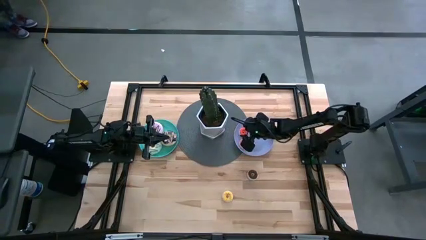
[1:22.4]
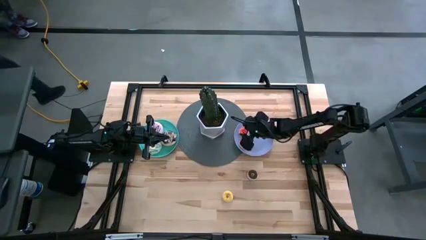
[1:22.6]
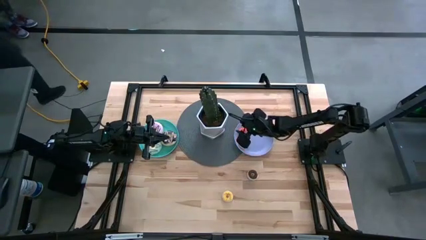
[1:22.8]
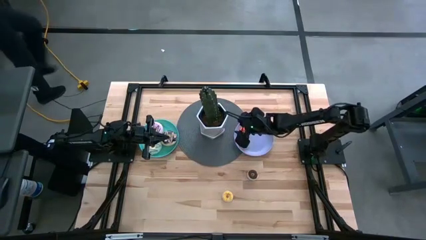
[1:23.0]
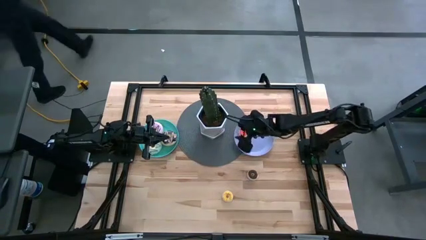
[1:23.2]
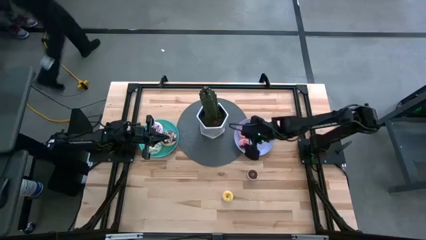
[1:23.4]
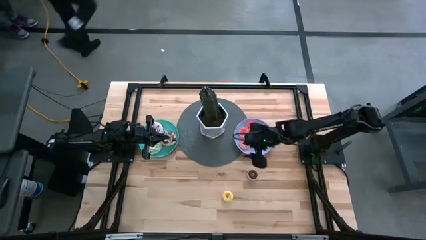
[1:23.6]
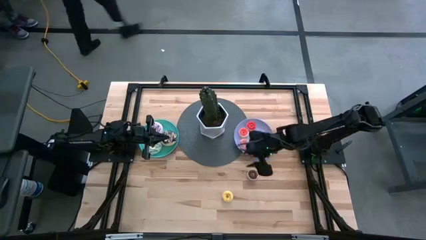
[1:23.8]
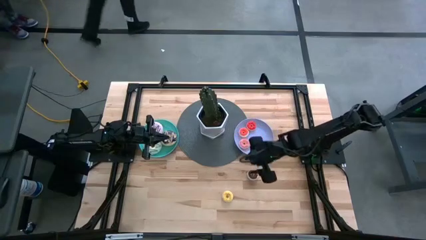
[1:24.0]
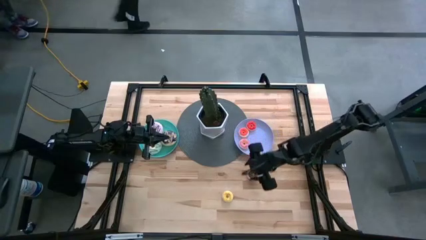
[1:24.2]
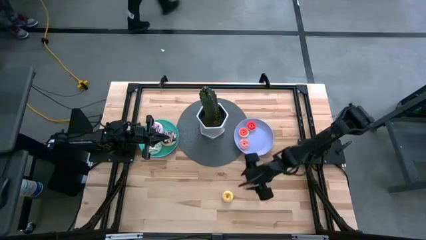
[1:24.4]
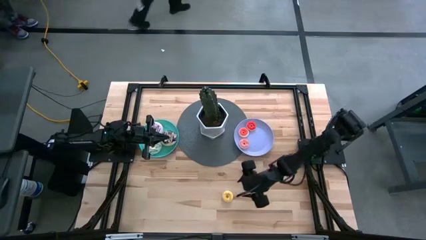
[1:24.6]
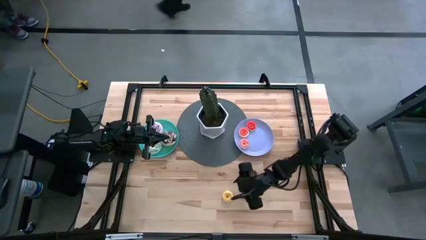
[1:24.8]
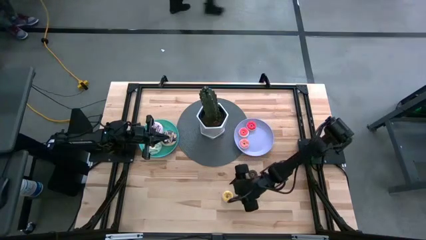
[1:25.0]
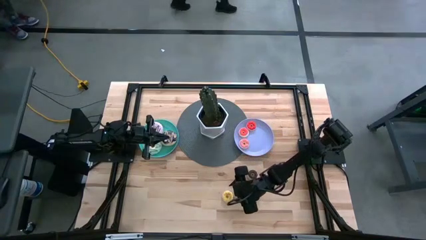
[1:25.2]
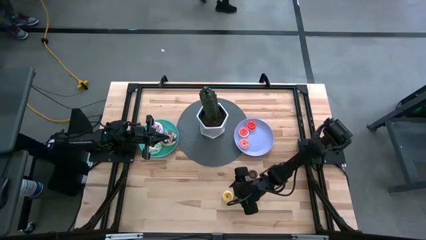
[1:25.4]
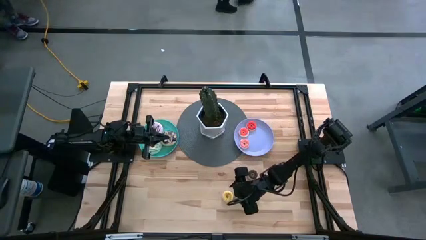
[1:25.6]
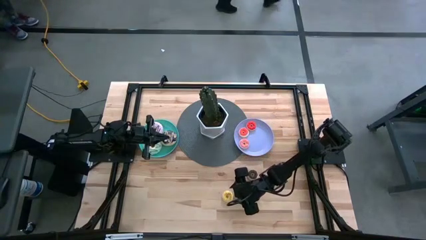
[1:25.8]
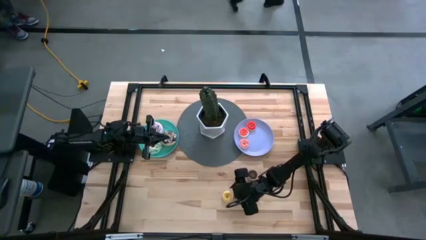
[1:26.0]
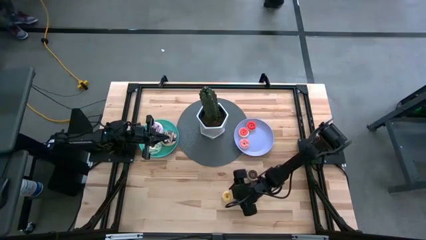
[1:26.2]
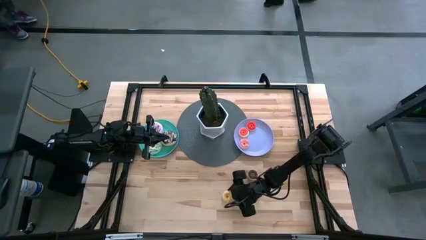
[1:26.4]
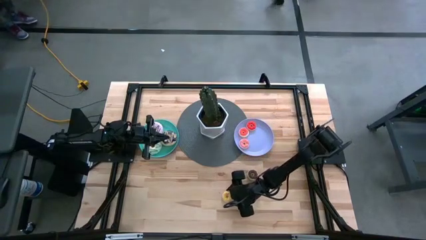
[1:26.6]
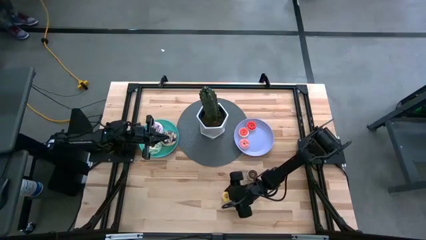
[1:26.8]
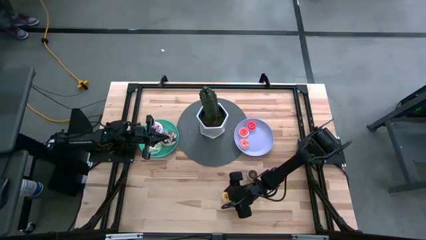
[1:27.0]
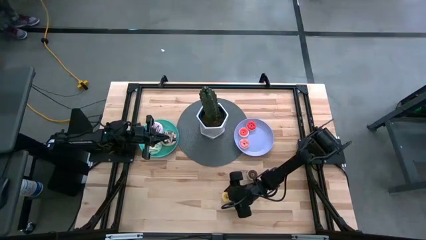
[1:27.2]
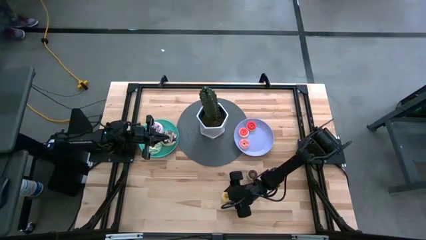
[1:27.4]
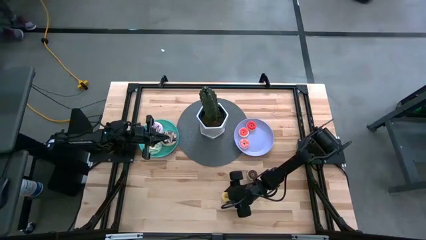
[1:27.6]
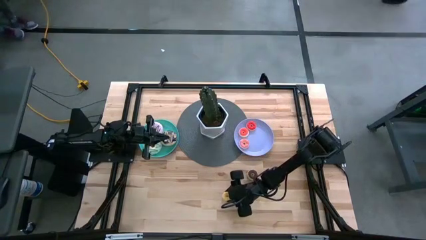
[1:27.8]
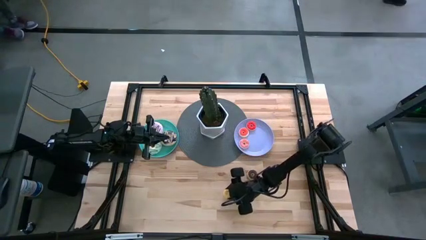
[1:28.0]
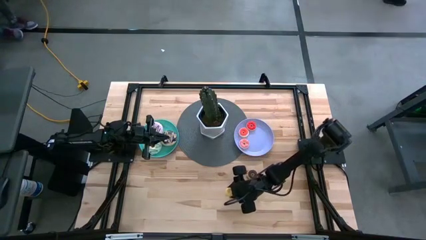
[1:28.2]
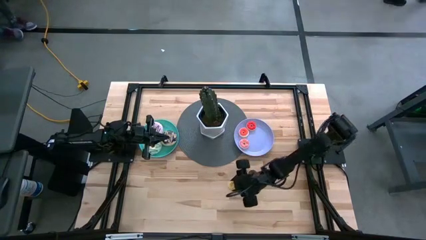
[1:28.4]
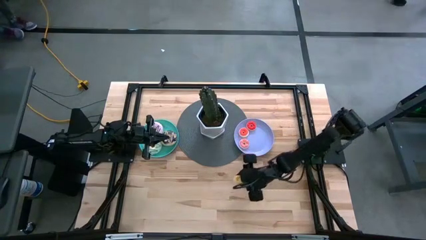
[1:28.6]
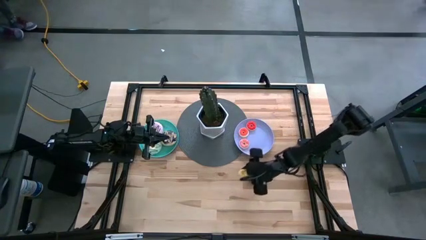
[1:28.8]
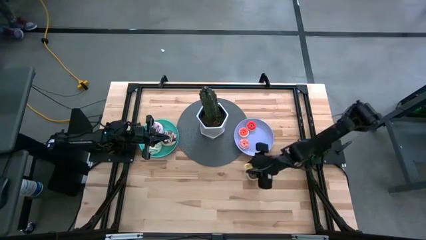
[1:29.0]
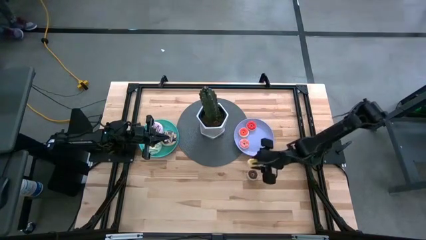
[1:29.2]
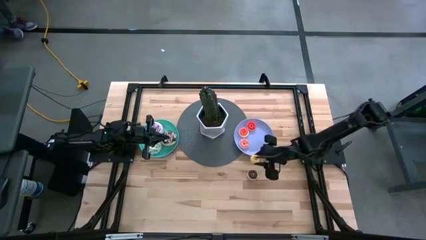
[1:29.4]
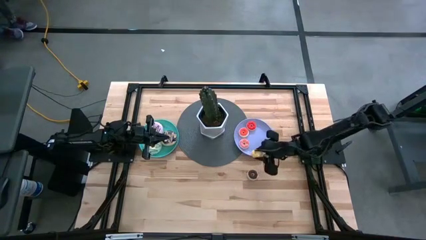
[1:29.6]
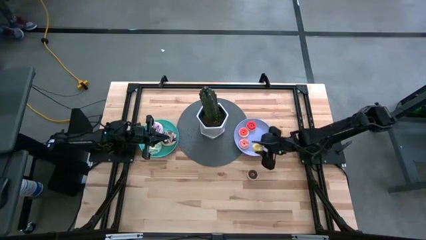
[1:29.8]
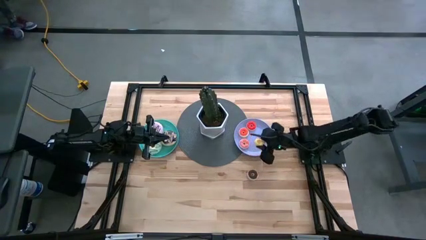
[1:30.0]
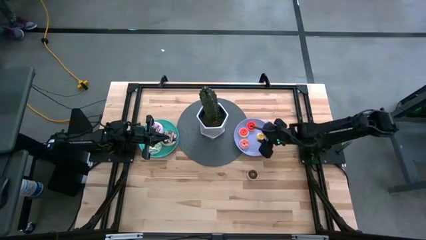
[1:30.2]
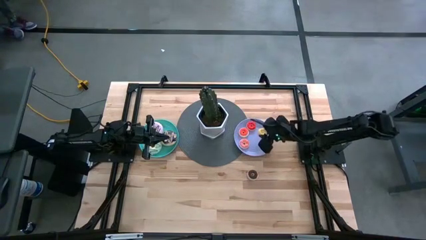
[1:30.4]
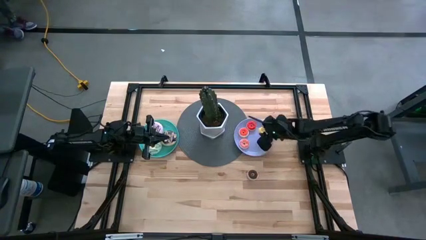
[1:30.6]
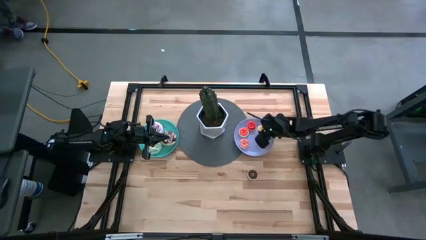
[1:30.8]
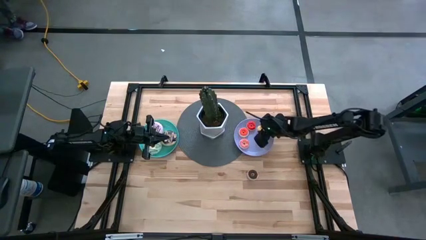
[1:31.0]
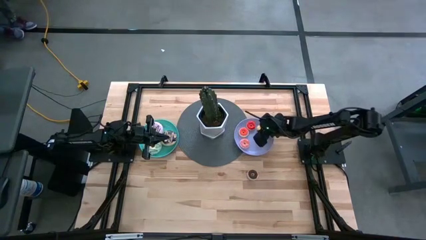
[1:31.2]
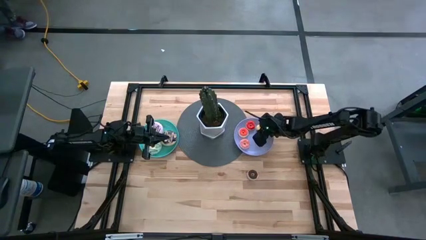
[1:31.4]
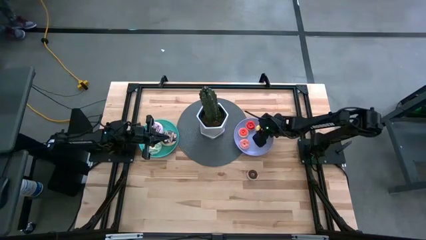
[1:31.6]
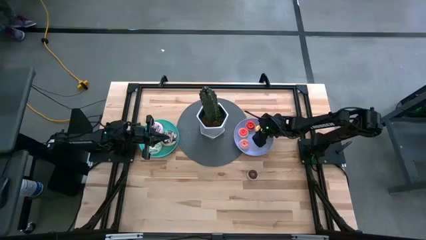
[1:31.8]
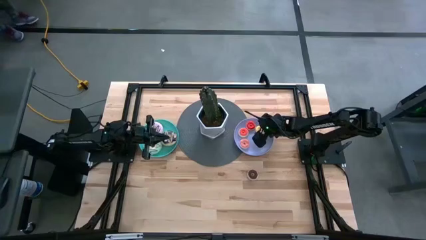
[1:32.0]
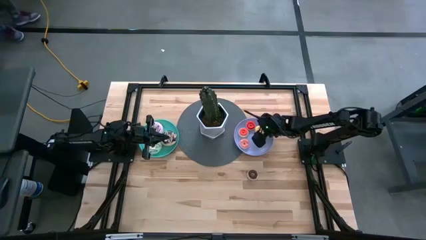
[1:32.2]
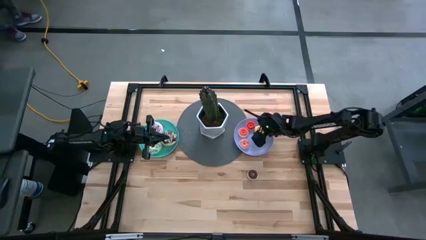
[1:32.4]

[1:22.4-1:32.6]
Task: Pick & Place donuts
Put the small yellow donut on the purple plate
